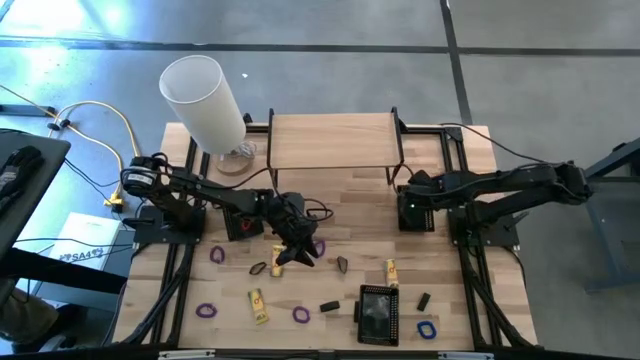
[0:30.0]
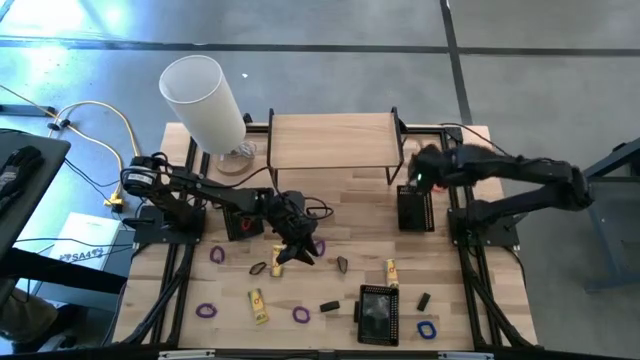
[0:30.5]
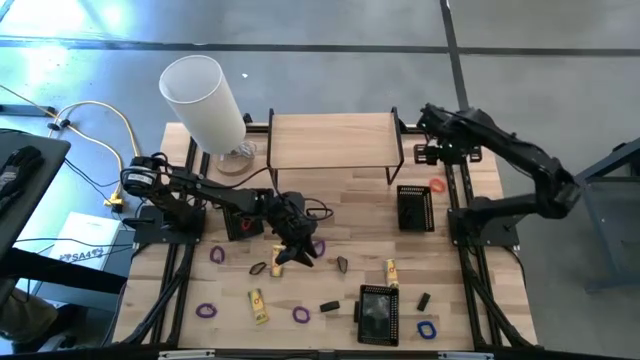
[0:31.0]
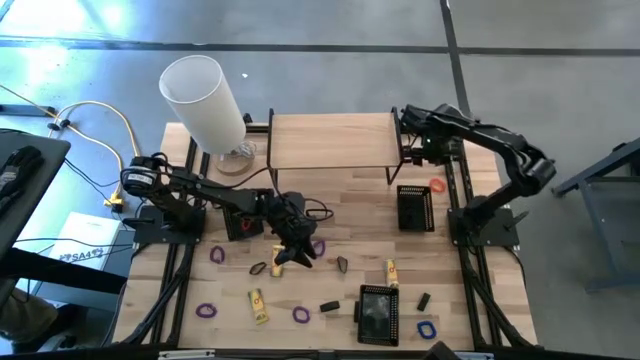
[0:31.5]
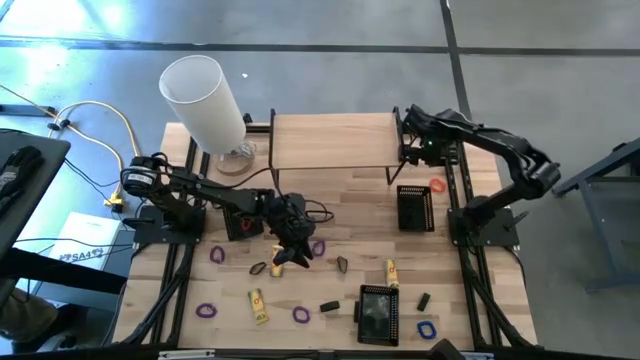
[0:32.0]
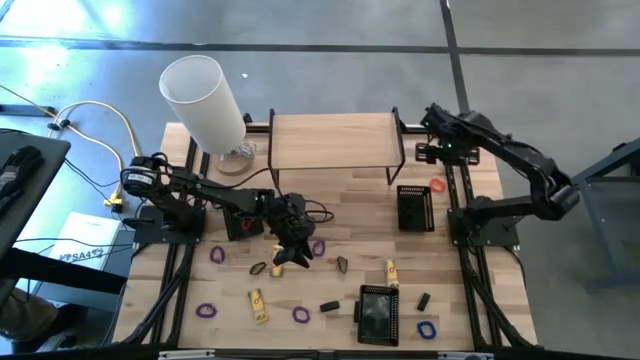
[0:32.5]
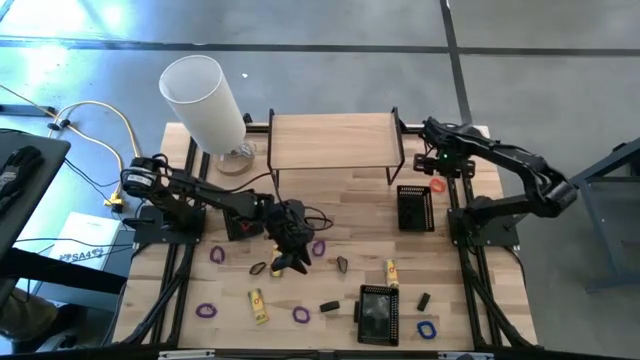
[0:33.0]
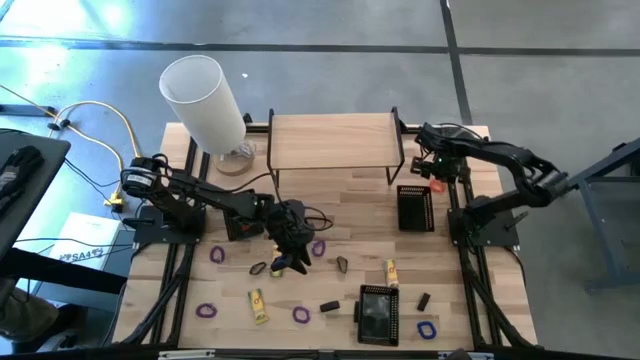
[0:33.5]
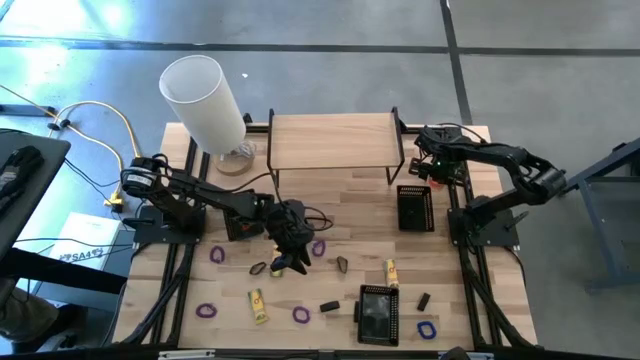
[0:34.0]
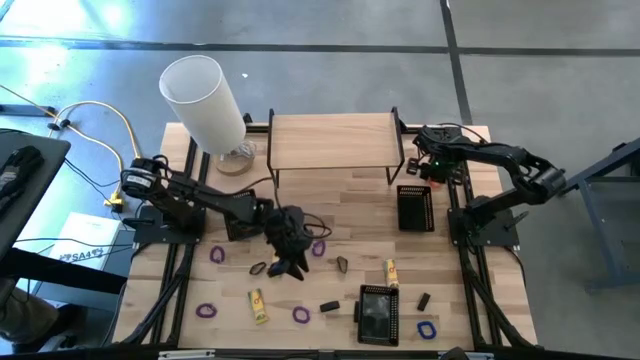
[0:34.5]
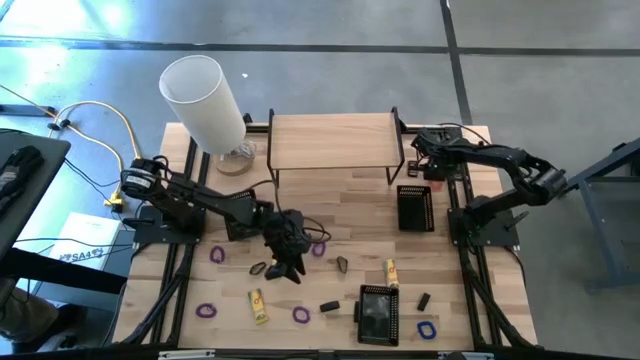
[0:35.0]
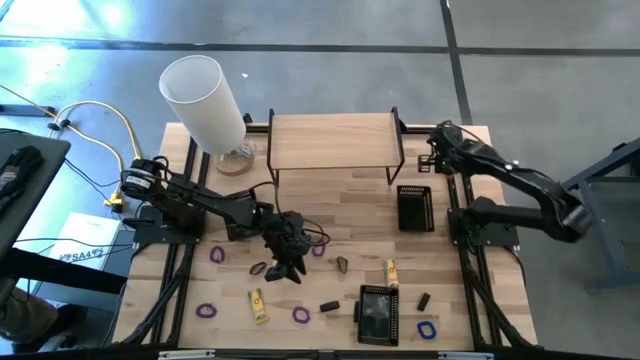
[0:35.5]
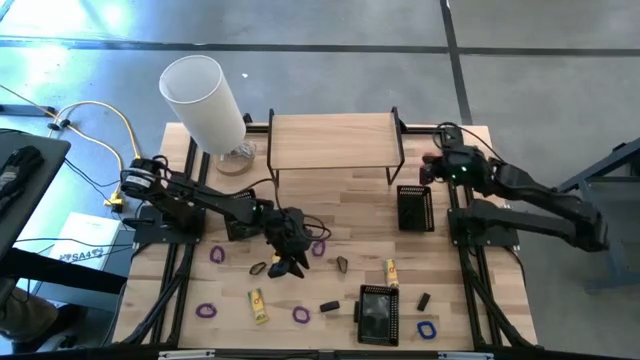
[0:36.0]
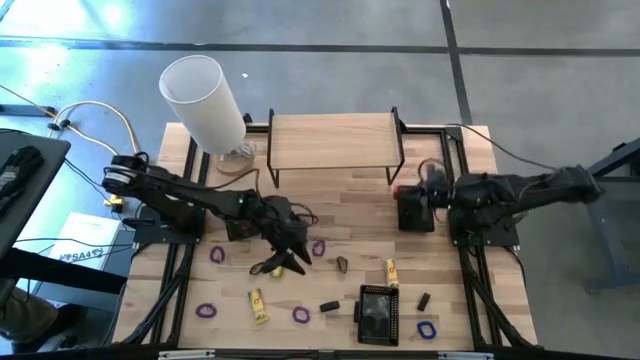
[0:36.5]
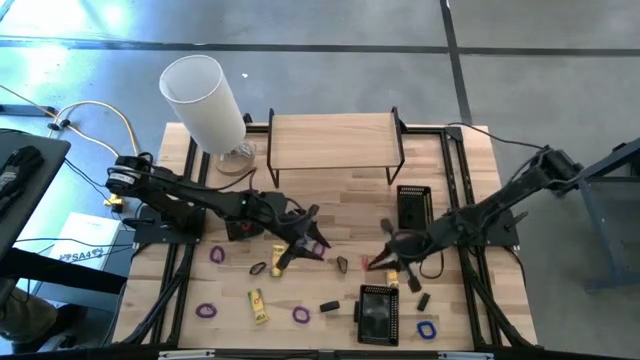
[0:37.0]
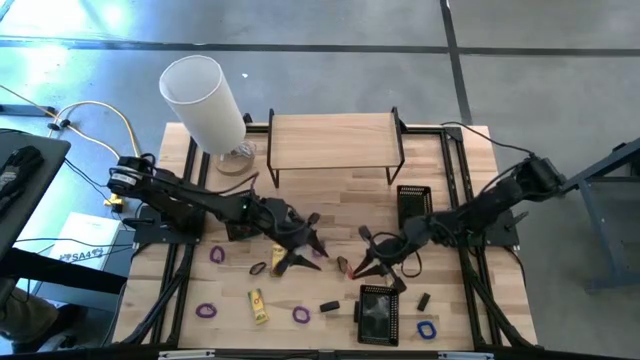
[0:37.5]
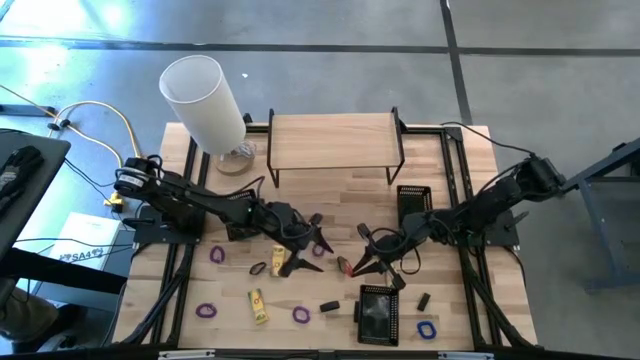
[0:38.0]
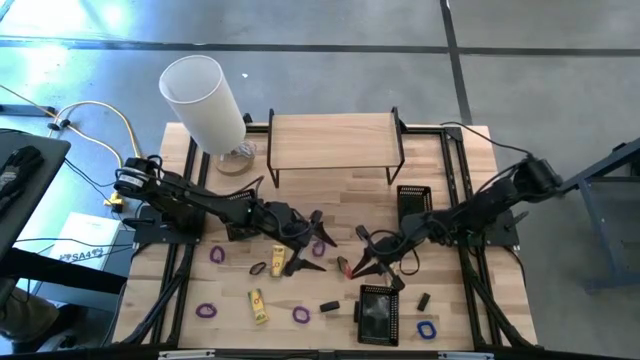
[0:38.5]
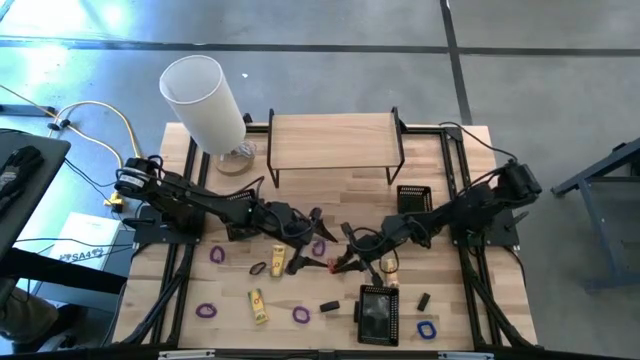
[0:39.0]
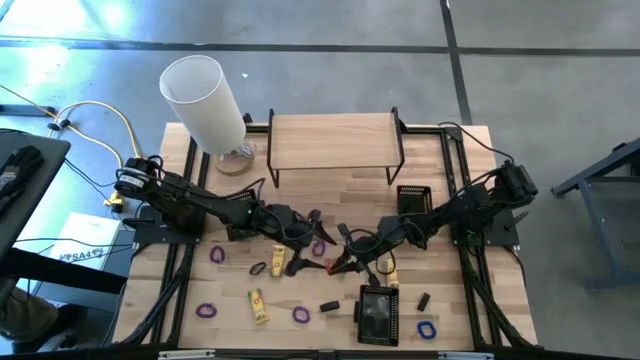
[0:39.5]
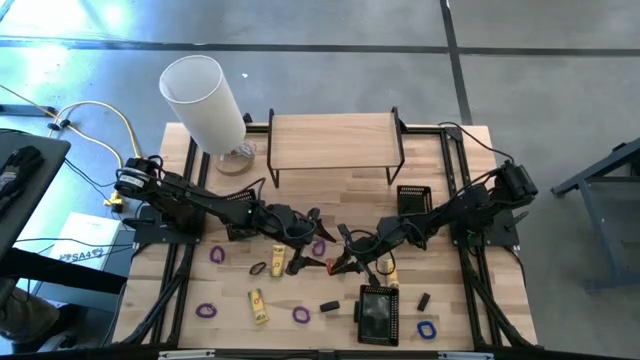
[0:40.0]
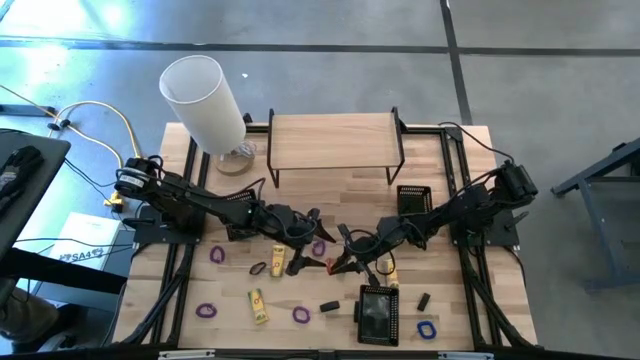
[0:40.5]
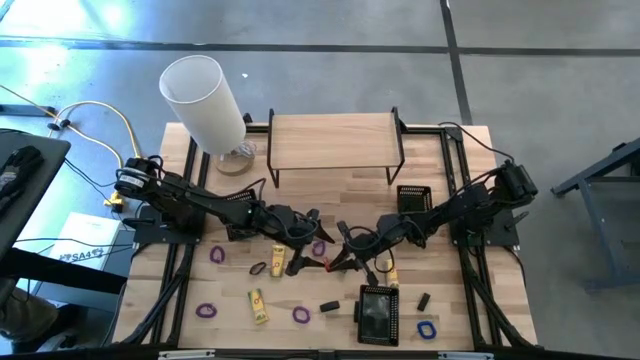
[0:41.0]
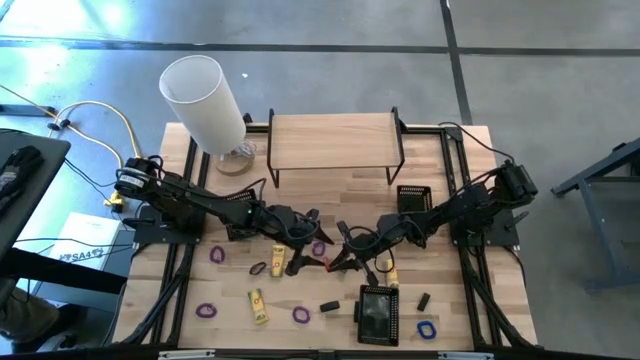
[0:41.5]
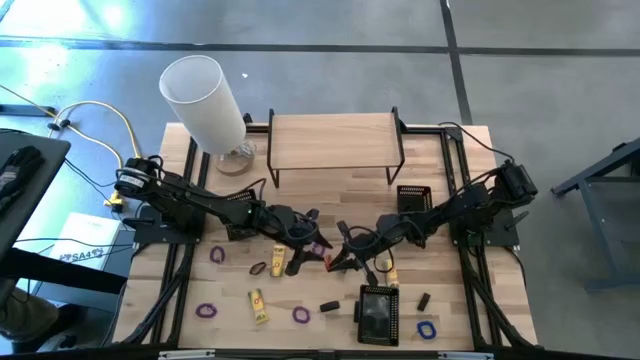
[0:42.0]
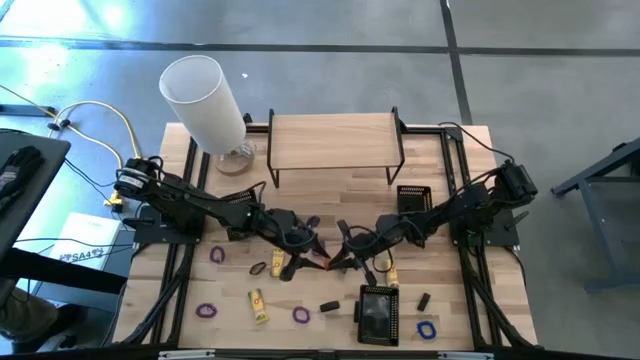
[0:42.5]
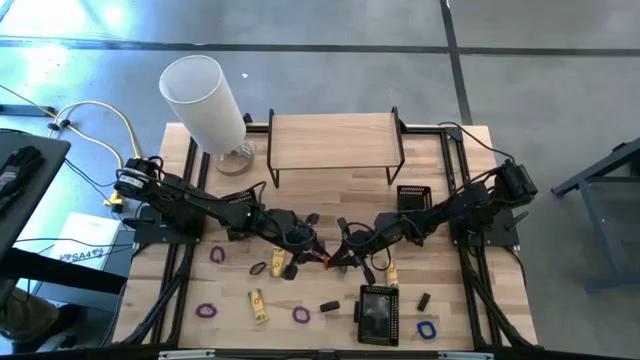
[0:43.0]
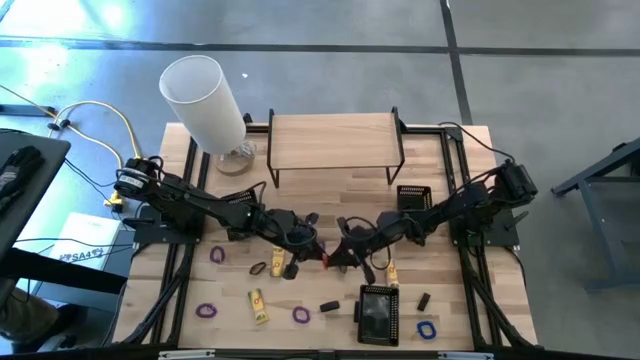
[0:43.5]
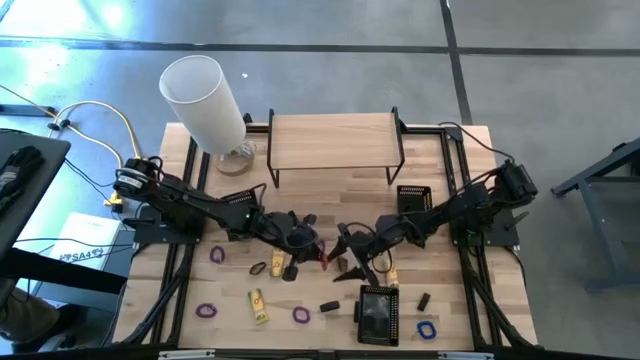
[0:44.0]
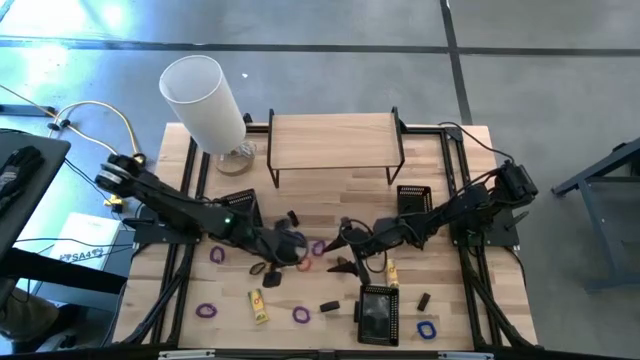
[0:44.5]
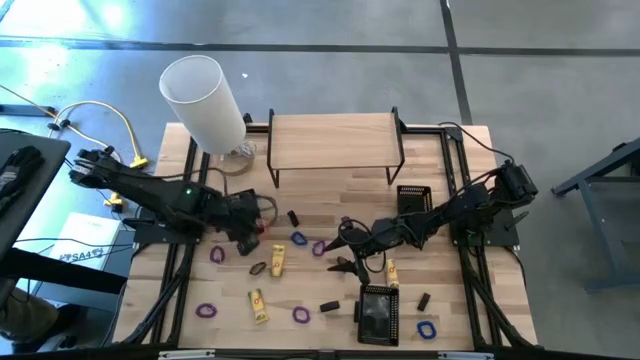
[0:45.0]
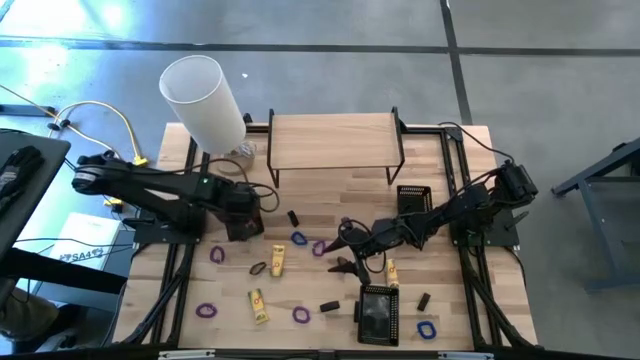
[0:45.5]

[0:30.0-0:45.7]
Task: Pick & Place Office Desk Supplies
Put the orange spiral keychain into the top left bin

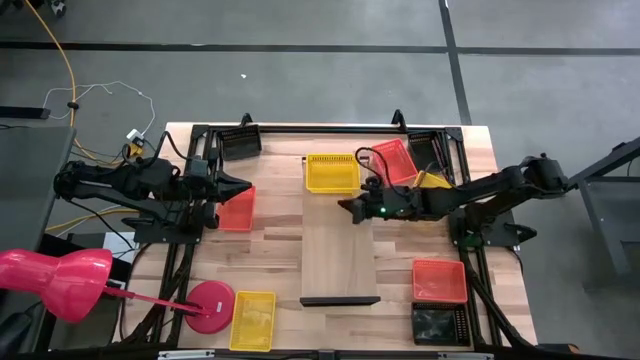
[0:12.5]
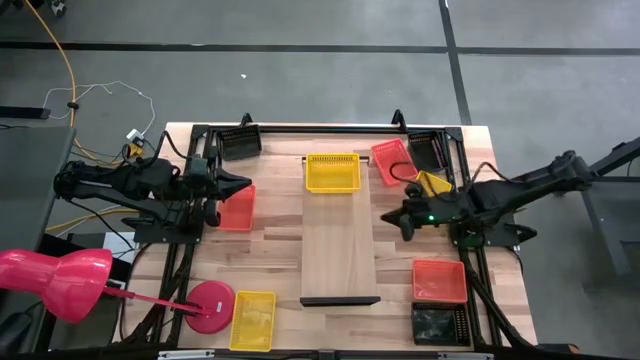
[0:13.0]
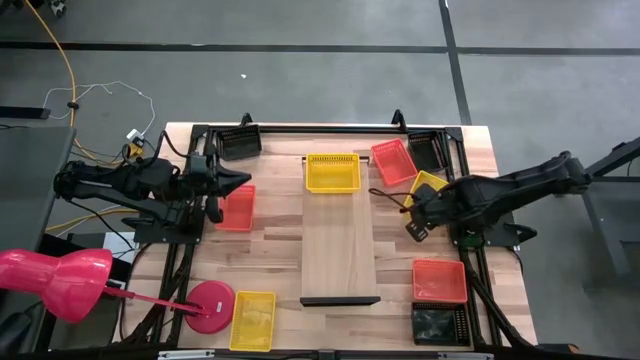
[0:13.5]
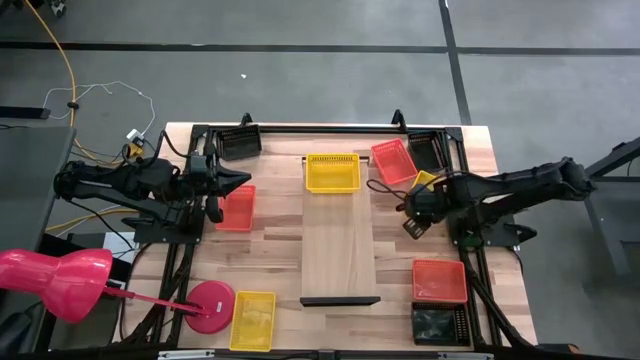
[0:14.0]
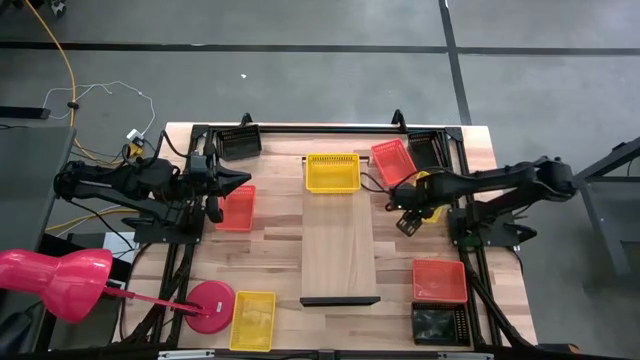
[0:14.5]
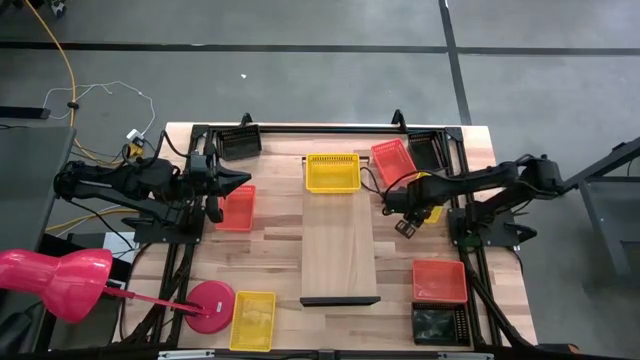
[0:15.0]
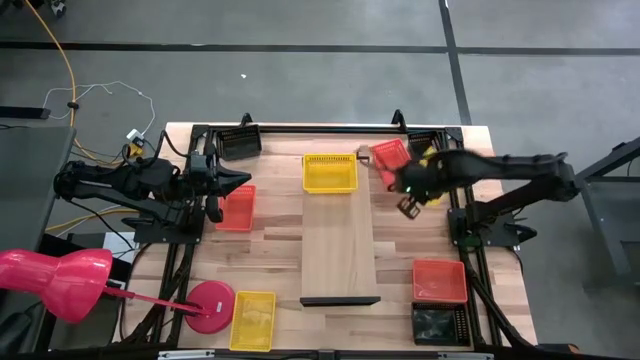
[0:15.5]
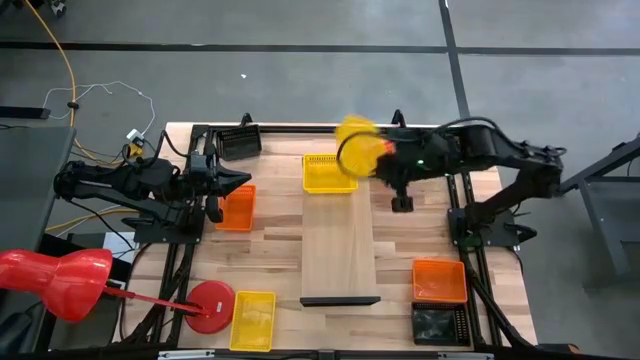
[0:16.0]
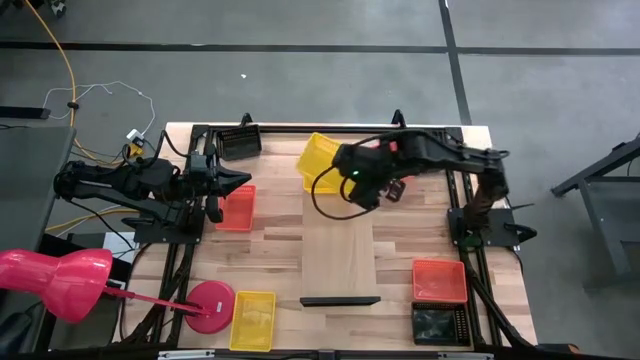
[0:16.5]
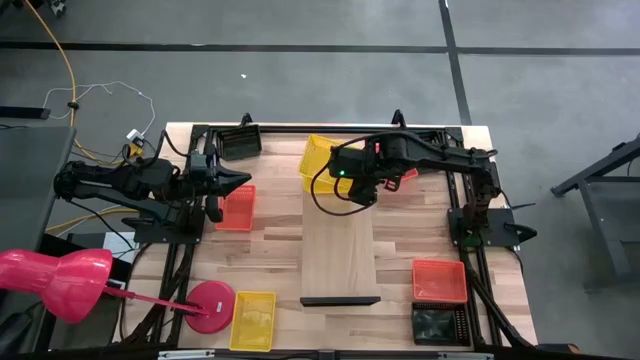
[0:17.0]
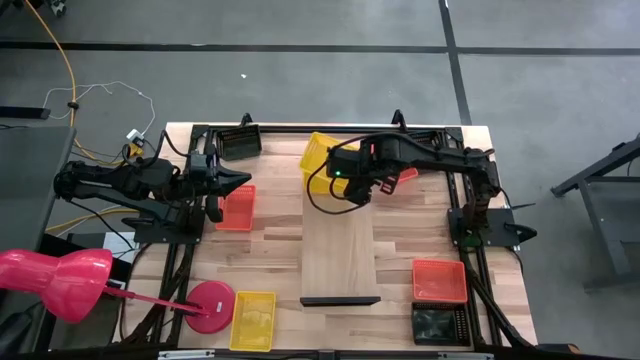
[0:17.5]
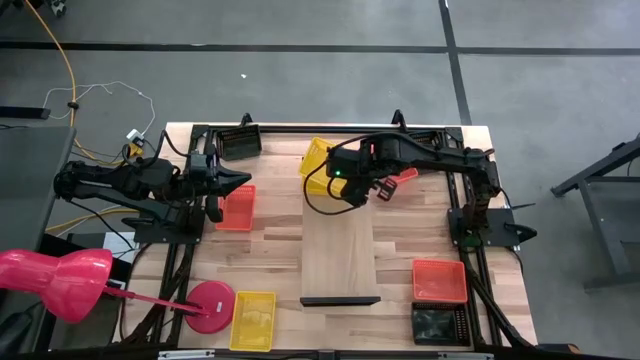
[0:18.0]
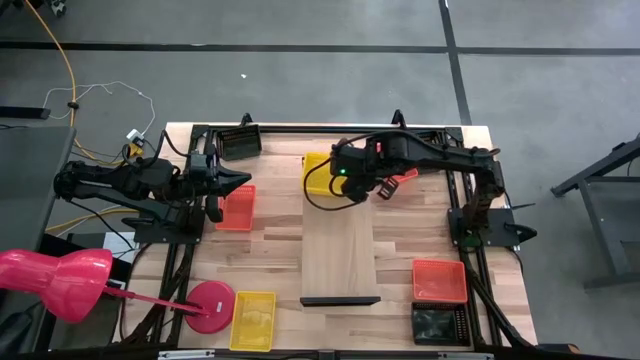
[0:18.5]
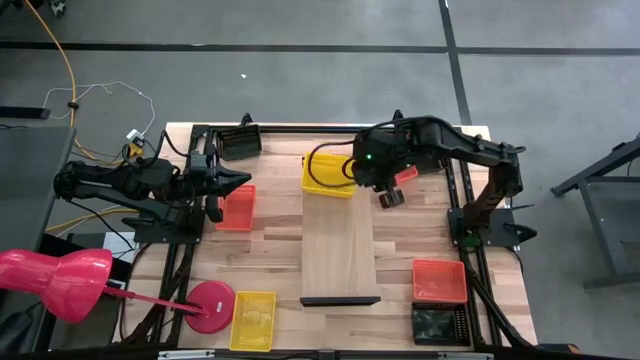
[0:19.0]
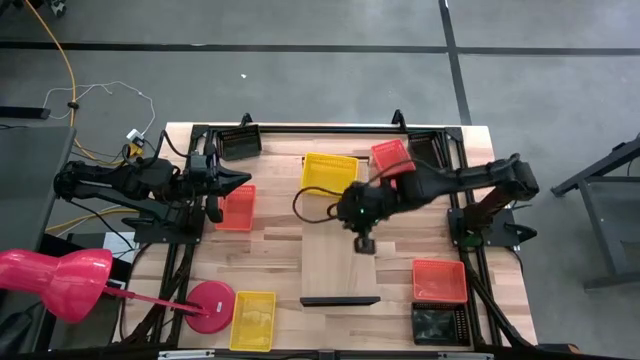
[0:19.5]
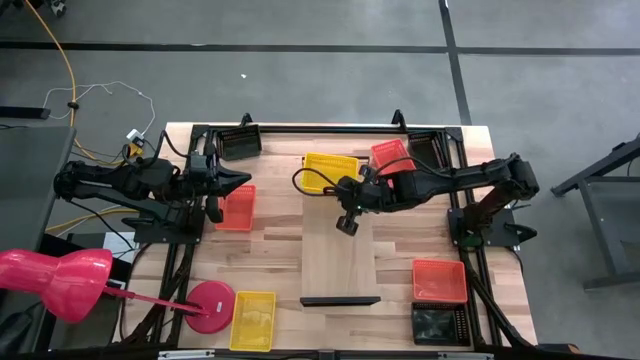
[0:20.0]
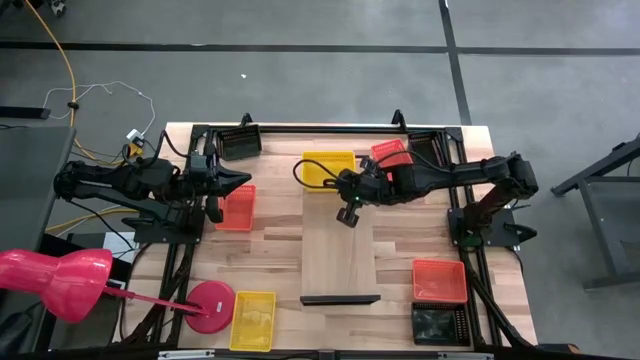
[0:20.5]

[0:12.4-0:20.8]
Task: Stack baskets on shelf by color
Stack the top yellow bin on top of the yellow bin on the shelf
